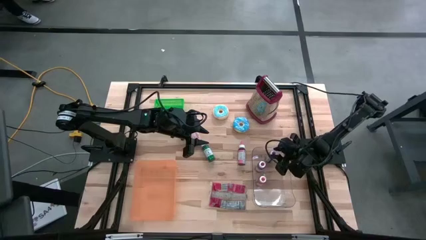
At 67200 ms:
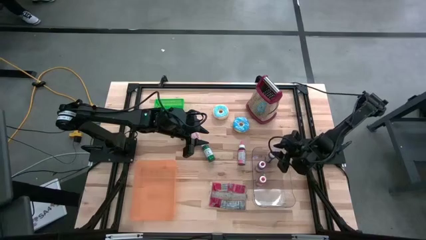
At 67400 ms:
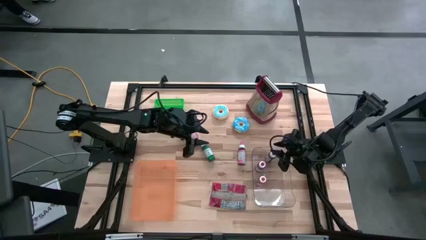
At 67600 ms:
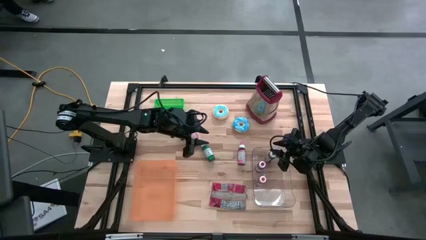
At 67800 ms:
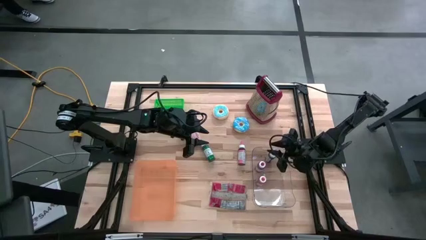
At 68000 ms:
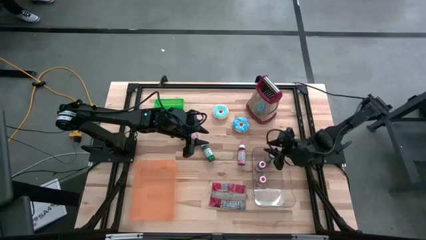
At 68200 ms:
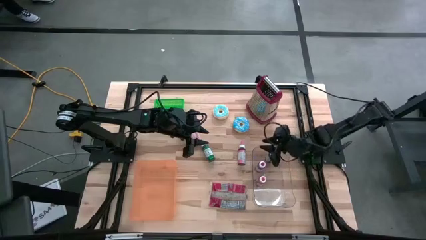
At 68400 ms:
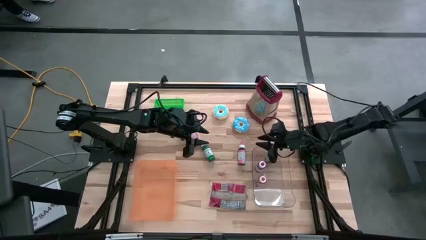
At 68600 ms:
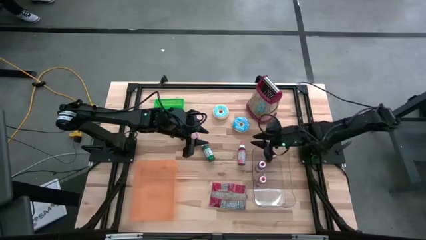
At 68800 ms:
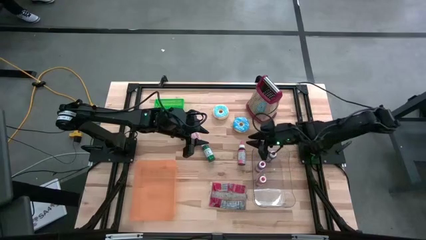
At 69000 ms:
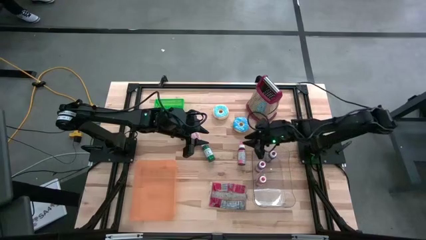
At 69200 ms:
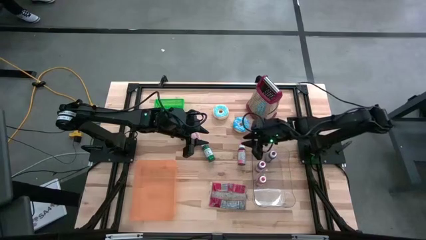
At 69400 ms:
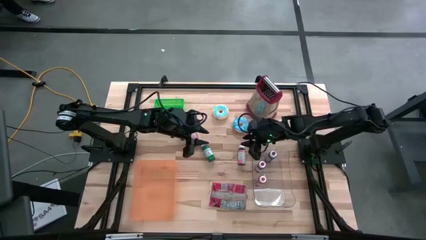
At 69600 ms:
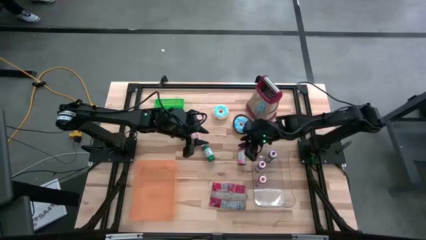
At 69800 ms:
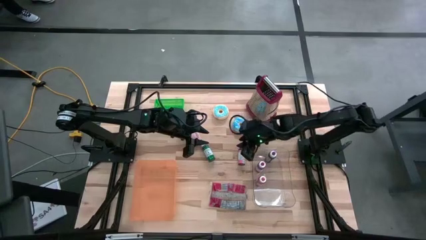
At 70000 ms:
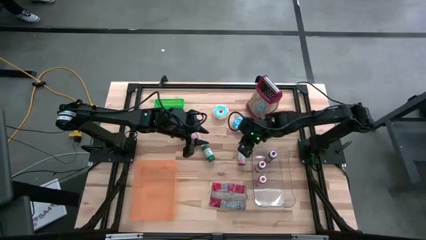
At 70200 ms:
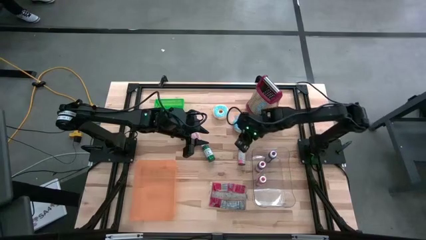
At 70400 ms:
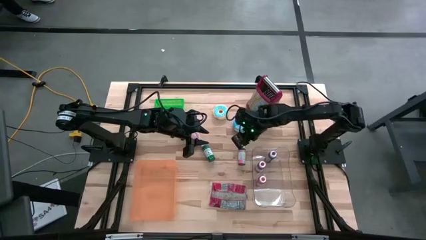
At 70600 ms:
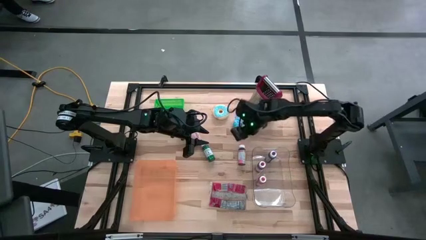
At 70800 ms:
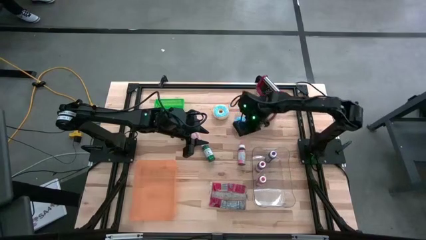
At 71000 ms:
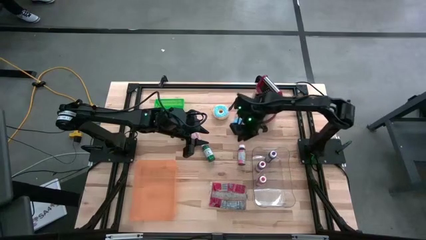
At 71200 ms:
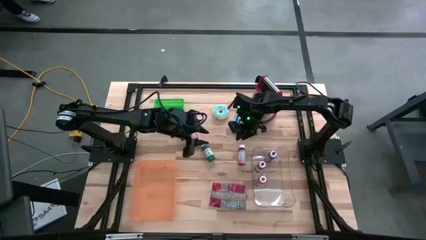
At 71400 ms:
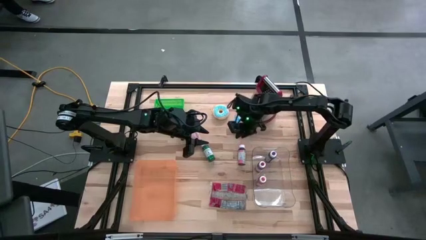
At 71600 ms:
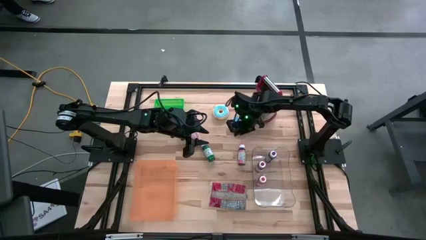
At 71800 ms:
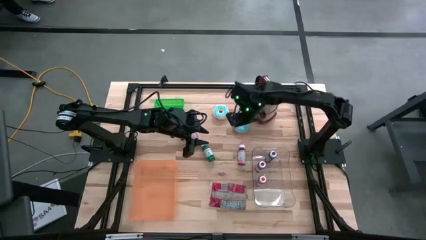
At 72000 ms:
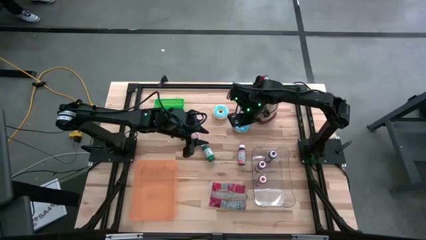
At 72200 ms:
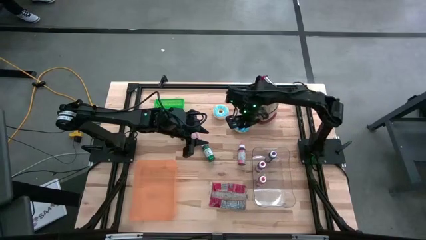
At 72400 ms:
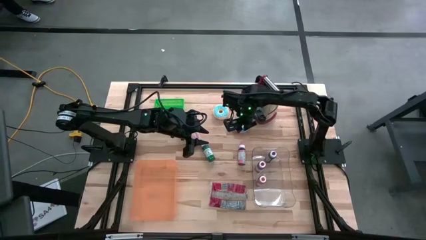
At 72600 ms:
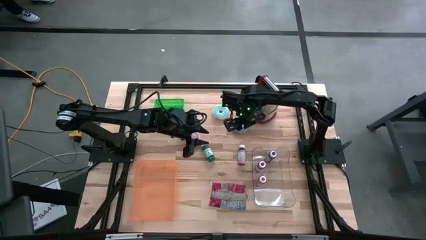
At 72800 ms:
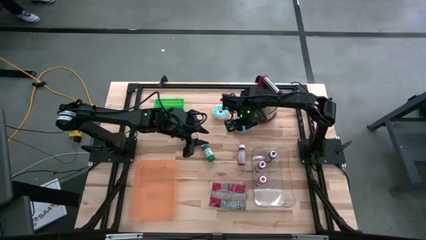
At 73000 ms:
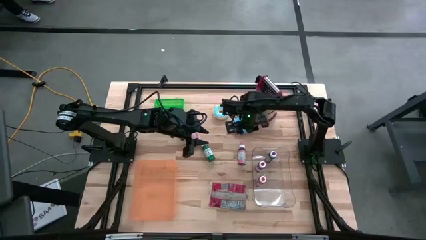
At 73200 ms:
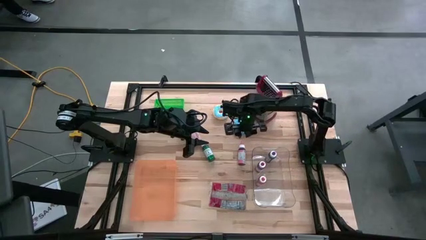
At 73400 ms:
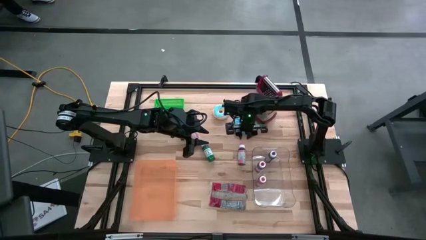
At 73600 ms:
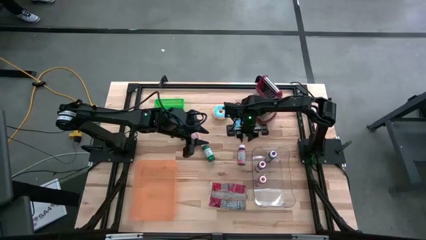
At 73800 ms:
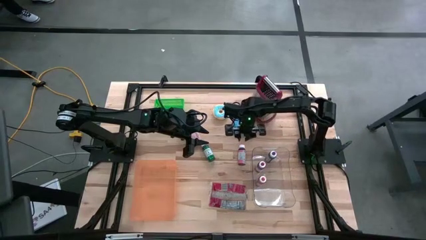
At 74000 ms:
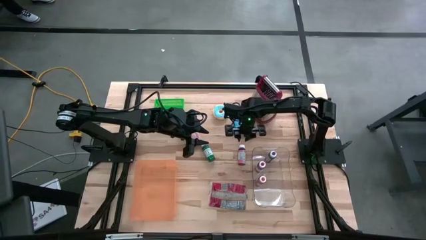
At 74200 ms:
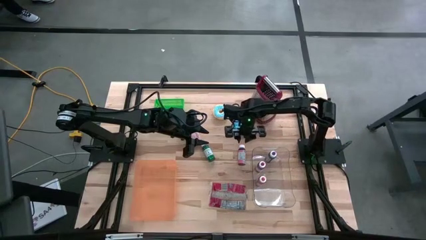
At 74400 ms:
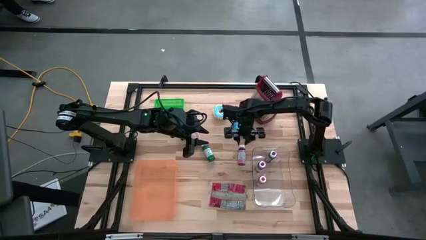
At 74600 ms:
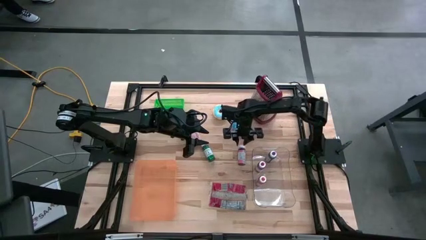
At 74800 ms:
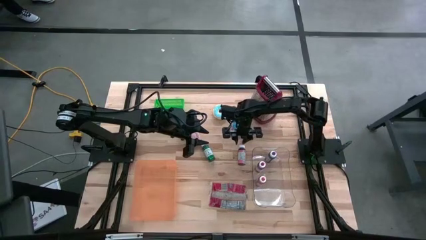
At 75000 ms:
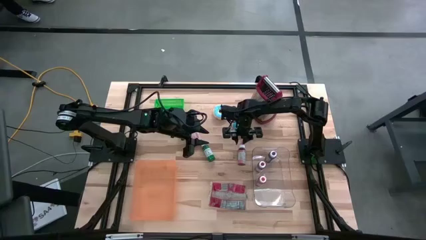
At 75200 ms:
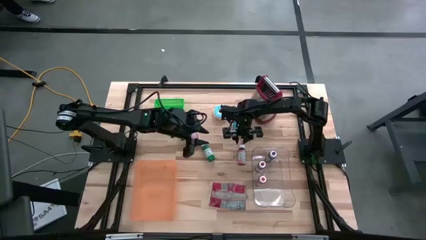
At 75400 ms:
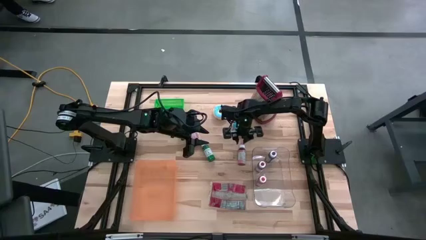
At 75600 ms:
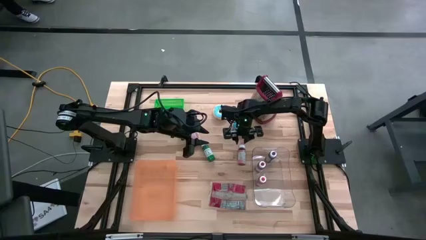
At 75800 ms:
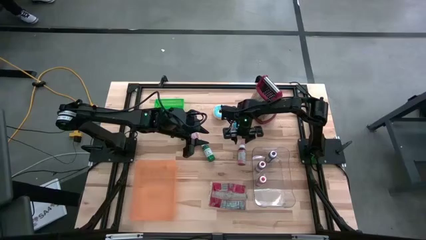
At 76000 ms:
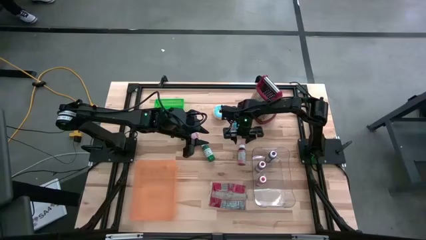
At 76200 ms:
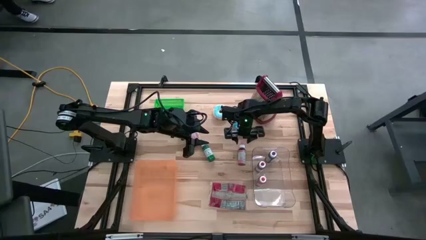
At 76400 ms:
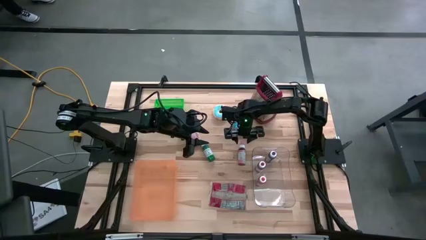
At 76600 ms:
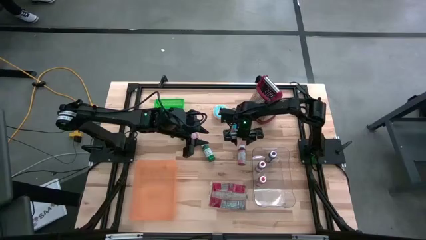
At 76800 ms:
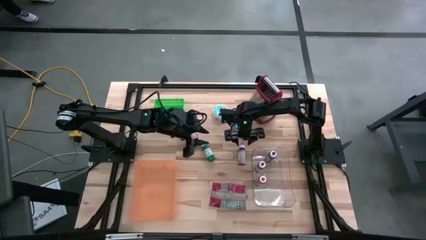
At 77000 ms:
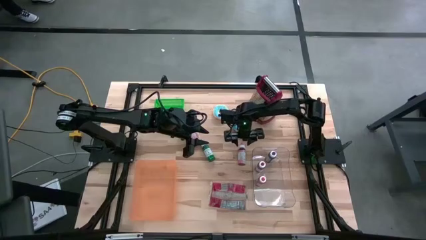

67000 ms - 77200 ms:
Put the pink paint bottle into the transparent bin

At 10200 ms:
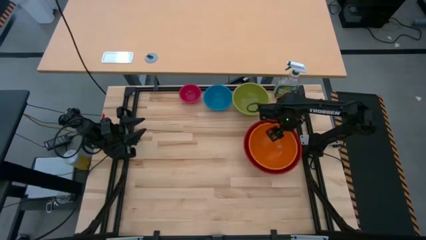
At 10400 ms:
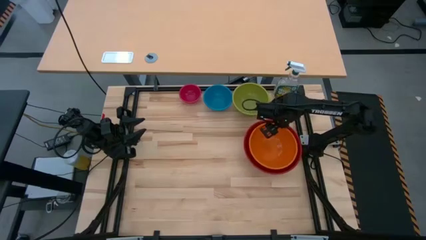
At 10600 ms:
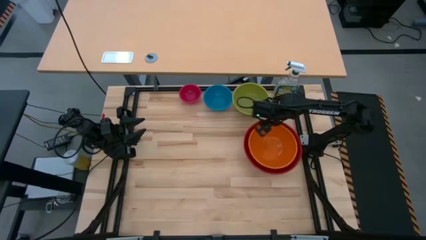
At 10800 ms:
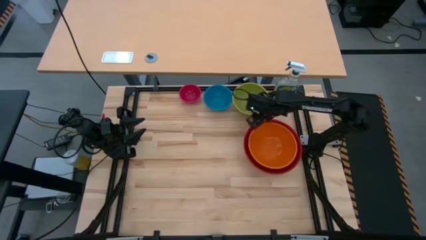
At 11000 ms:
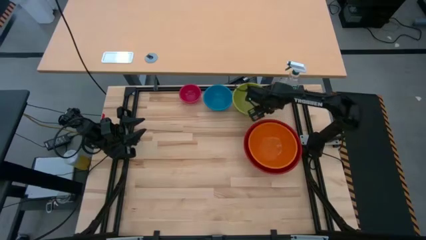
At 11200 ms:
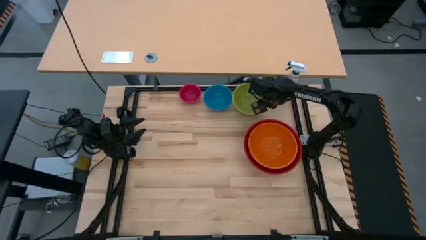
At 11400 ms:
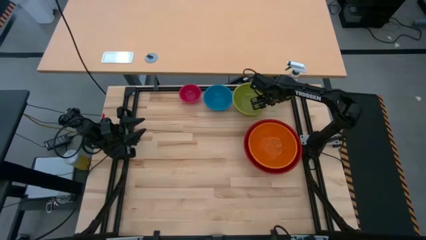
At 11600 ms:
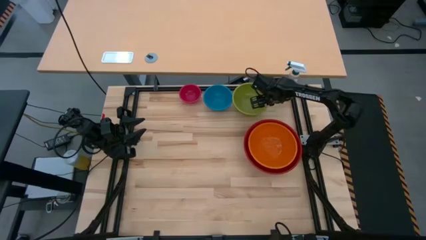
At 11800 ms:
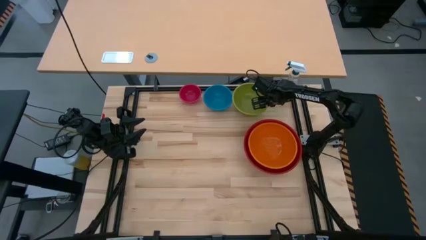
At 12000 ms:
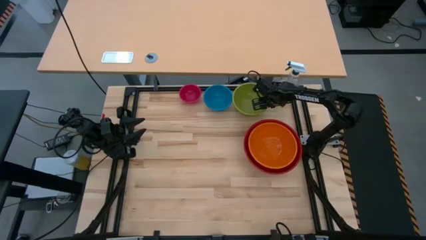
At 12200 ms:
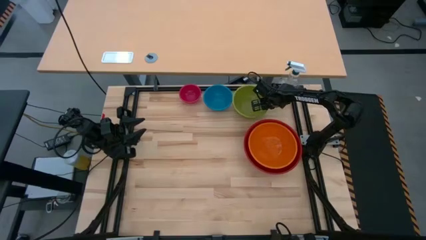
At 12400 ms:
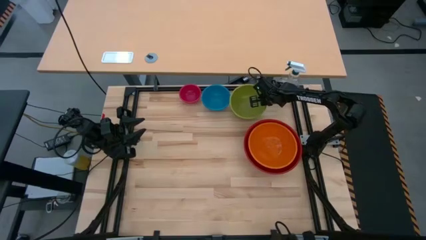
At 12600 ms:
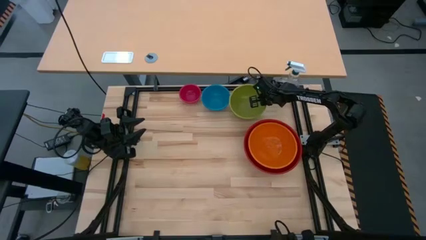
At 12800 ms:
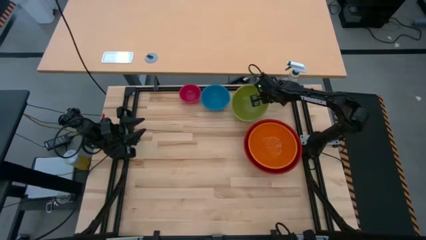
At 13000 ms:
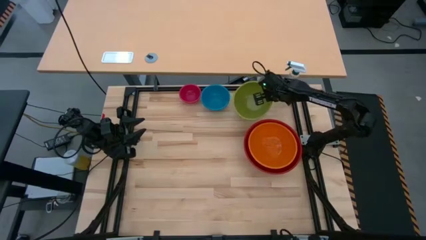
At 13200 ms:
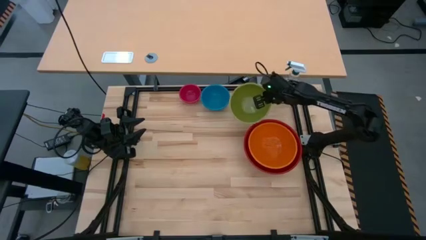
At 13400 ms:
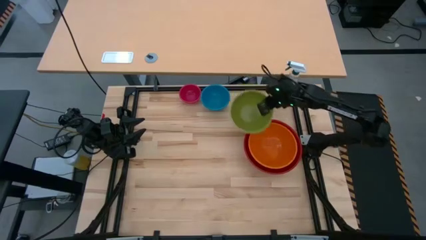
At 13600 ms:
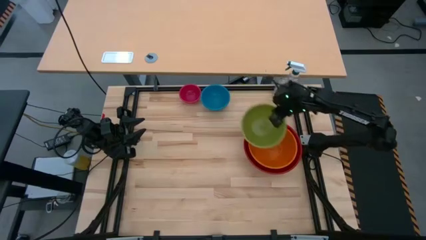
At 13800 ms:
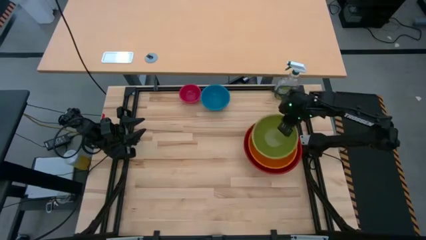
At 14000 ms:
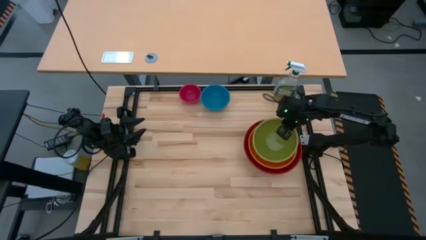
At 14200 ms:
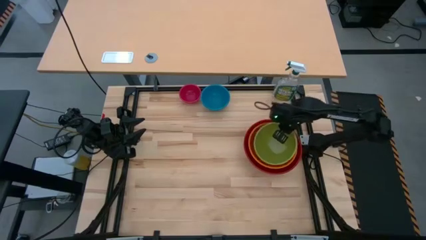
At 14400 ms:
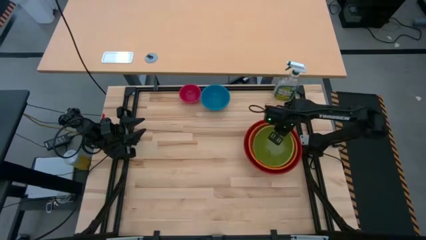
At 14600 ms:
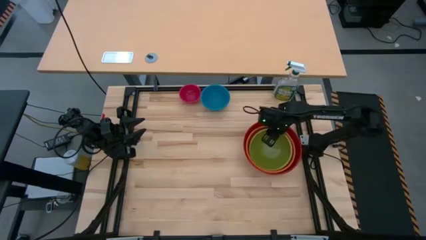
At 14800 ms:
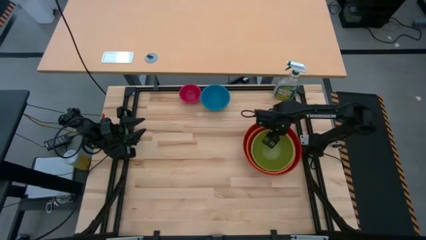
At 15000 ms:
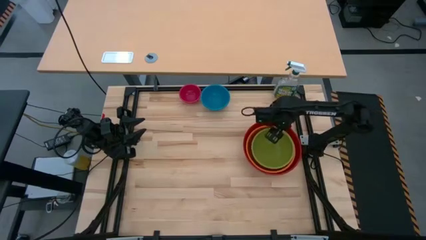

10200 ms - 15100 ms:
Stack the green bowl on the orange bowl
